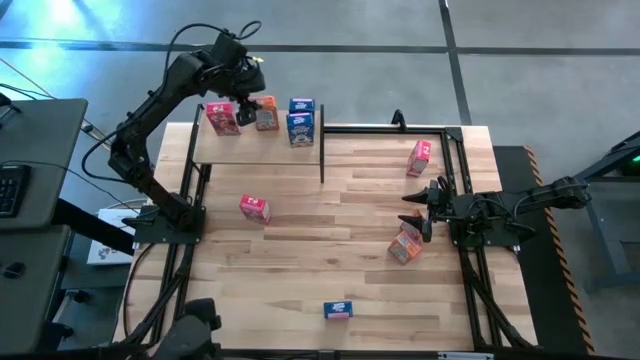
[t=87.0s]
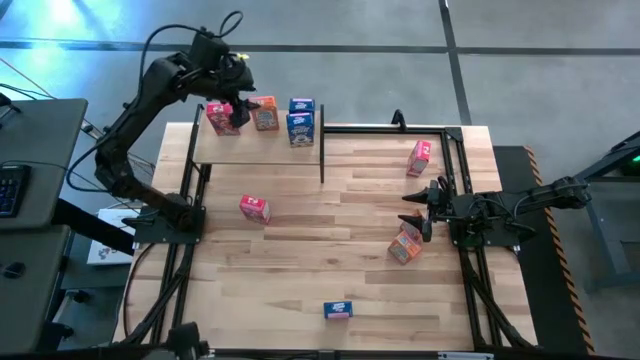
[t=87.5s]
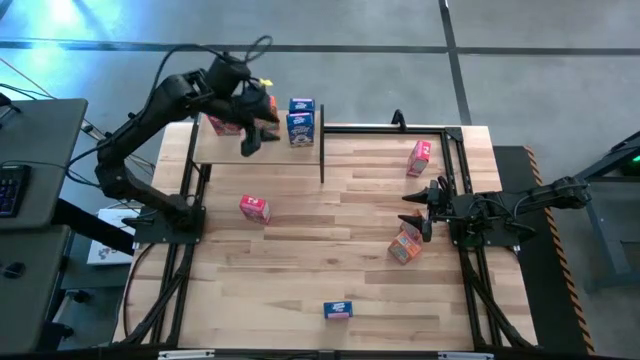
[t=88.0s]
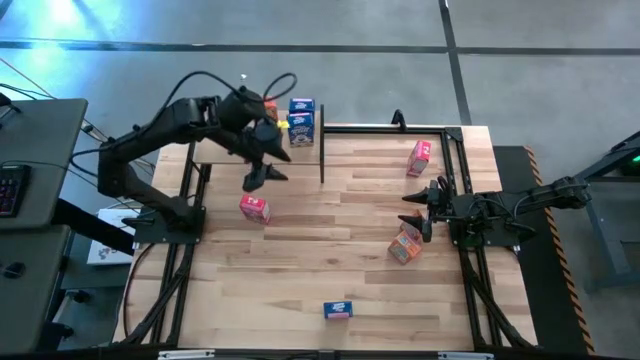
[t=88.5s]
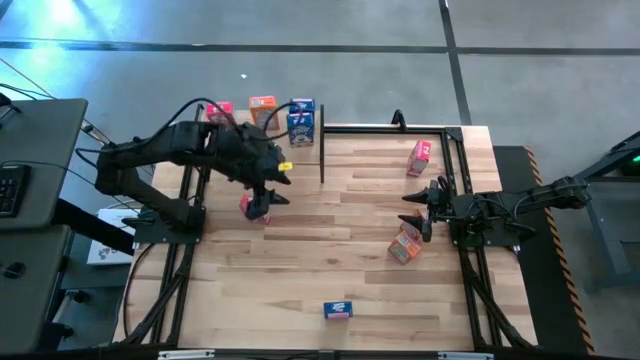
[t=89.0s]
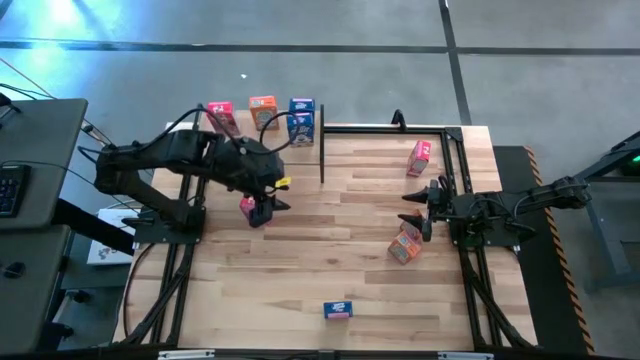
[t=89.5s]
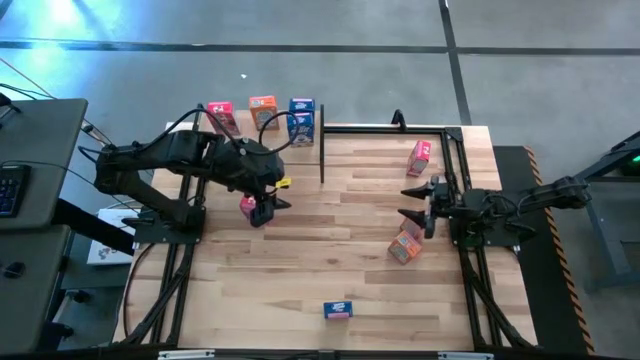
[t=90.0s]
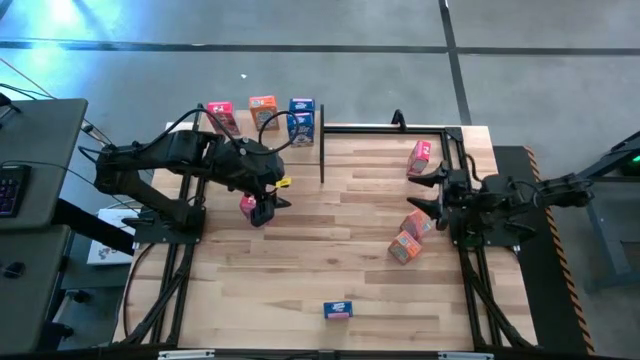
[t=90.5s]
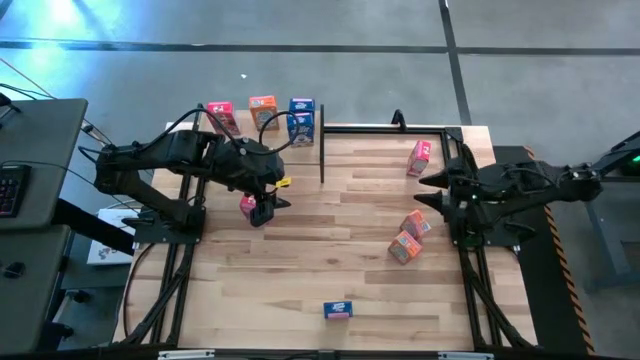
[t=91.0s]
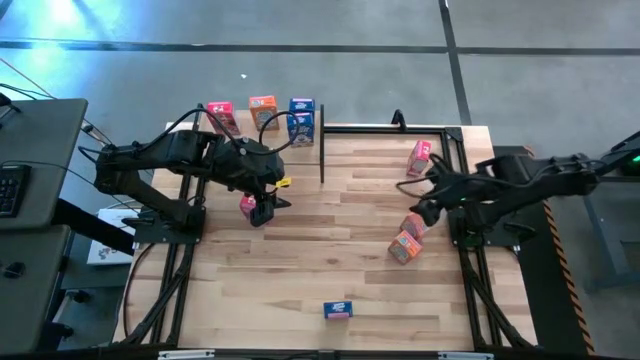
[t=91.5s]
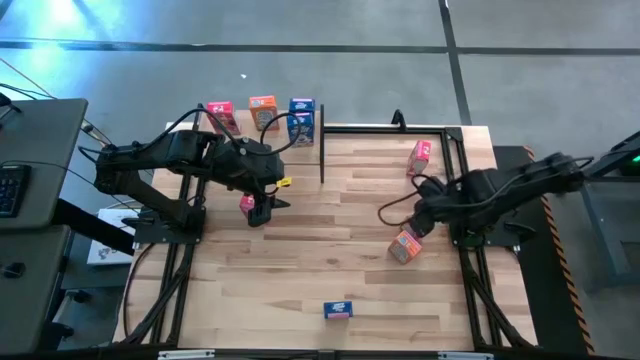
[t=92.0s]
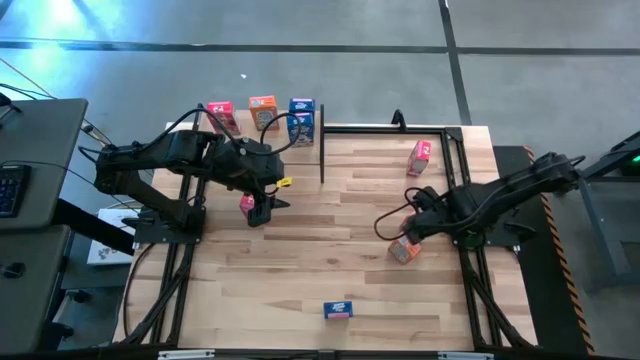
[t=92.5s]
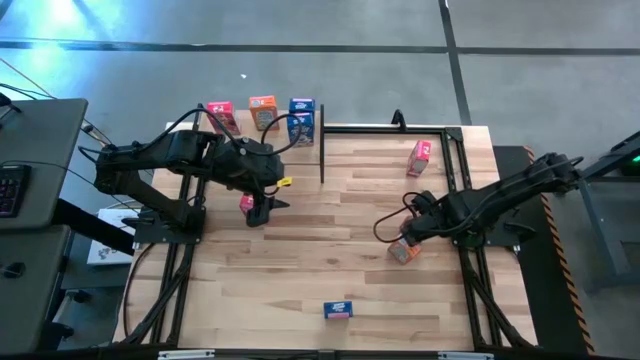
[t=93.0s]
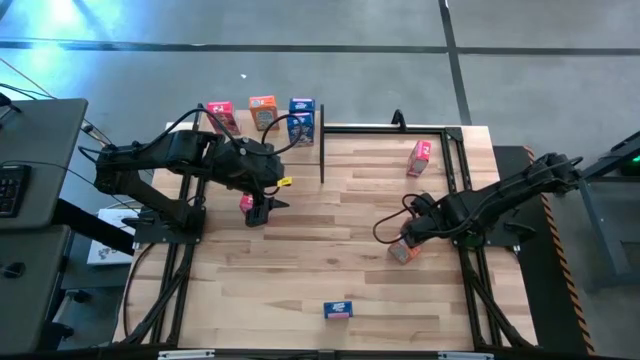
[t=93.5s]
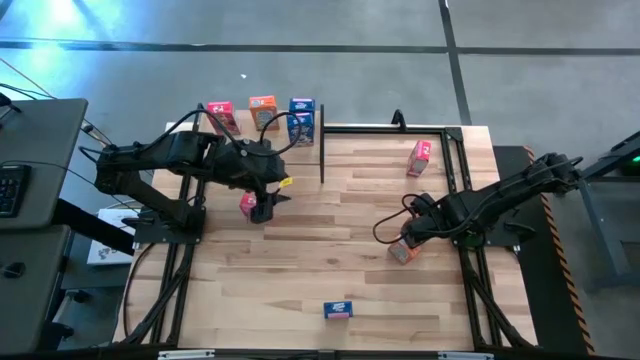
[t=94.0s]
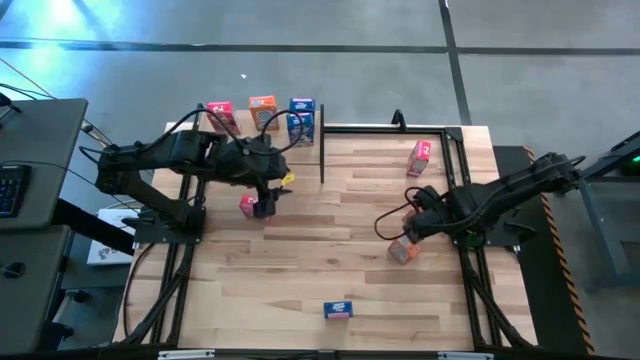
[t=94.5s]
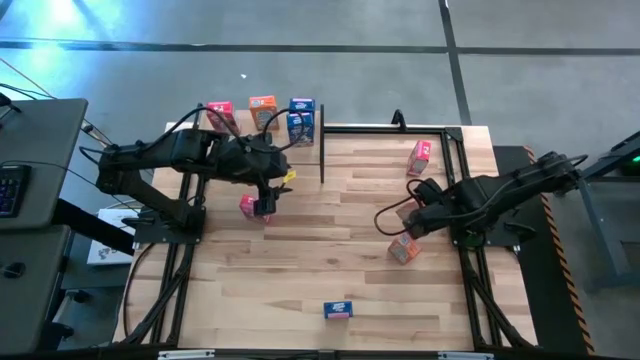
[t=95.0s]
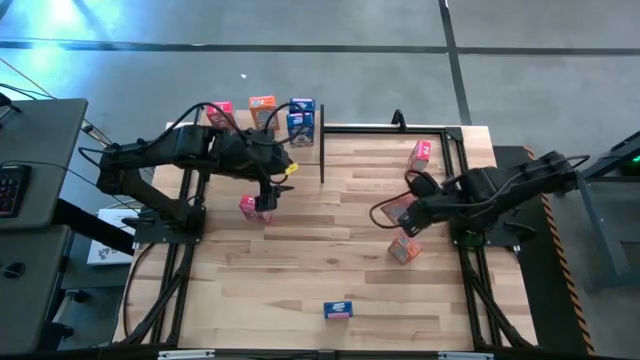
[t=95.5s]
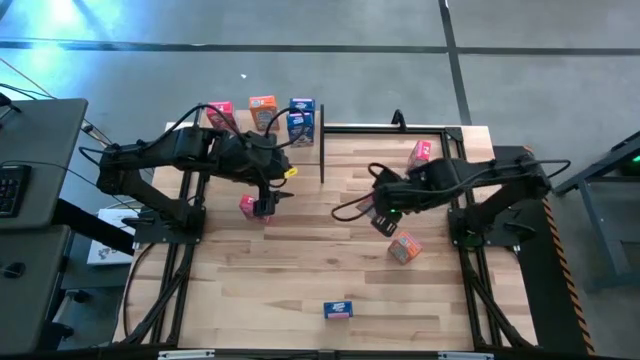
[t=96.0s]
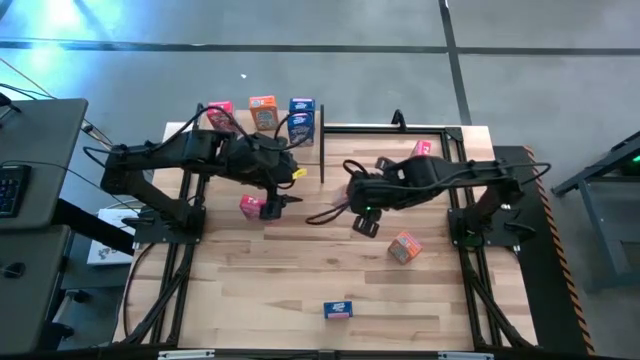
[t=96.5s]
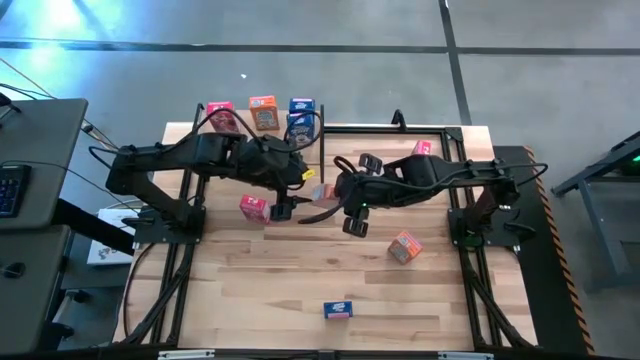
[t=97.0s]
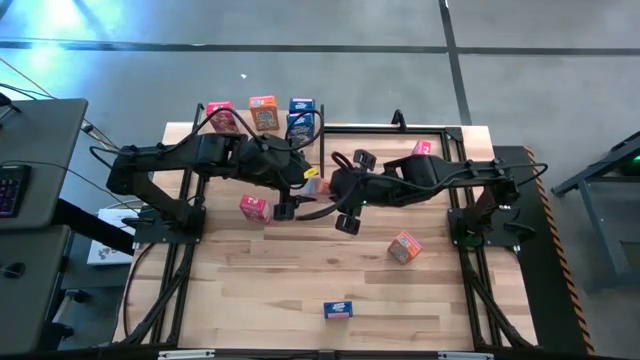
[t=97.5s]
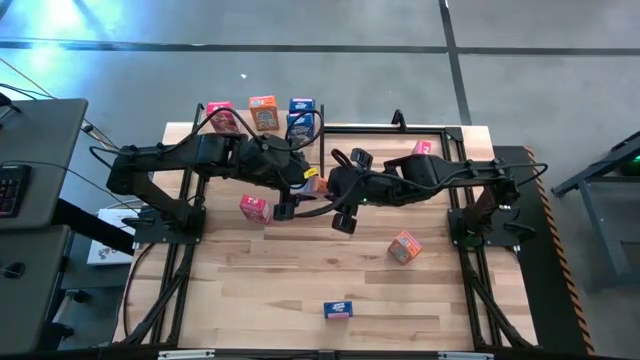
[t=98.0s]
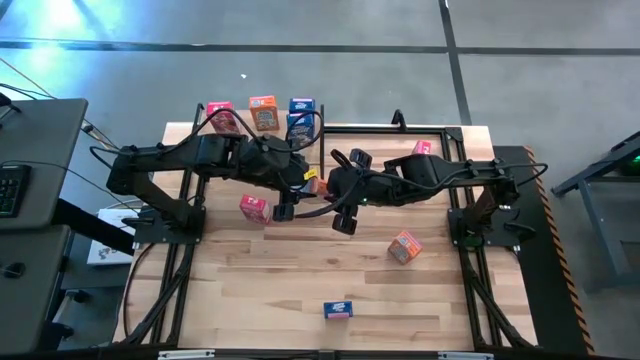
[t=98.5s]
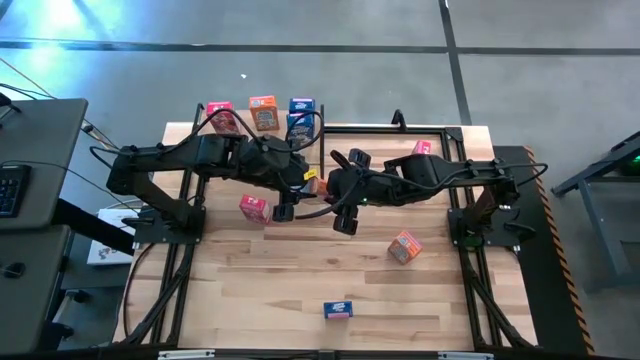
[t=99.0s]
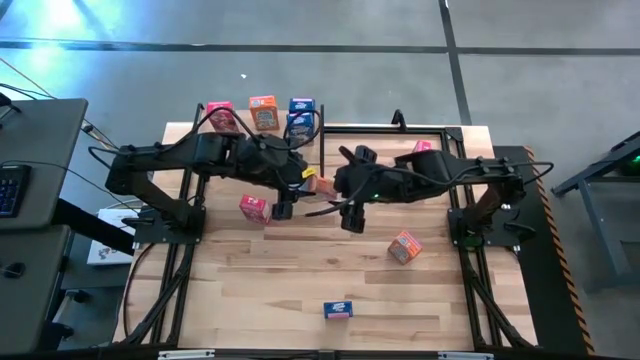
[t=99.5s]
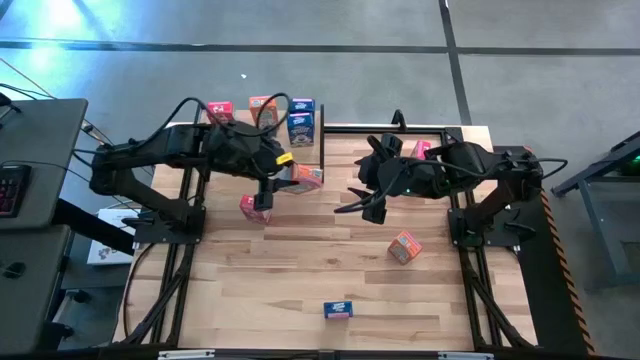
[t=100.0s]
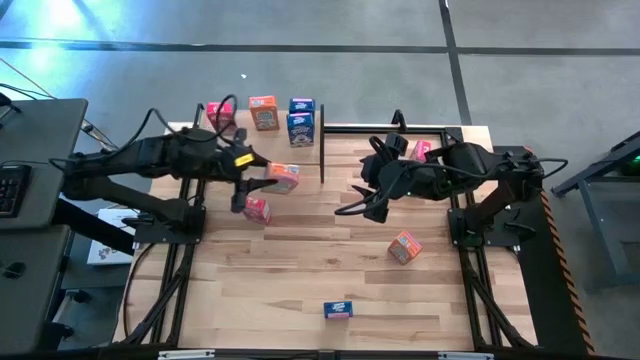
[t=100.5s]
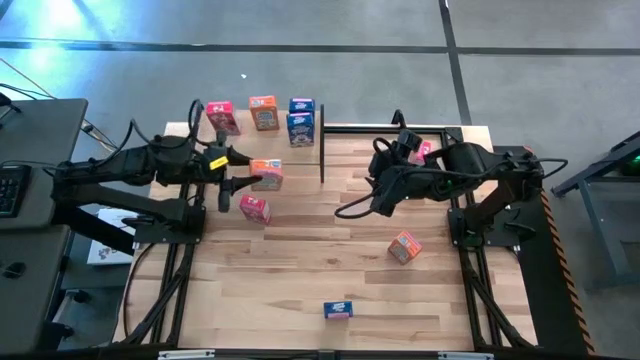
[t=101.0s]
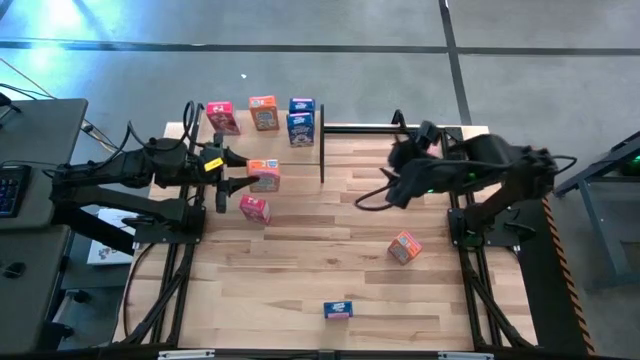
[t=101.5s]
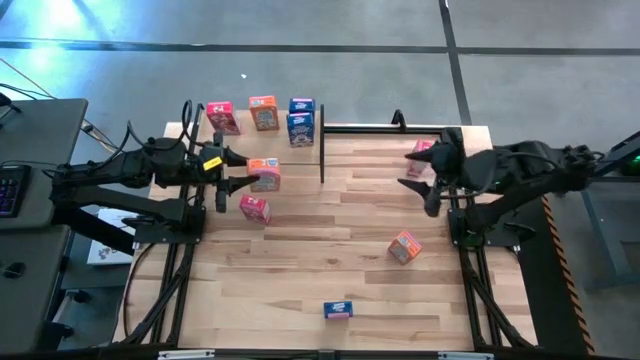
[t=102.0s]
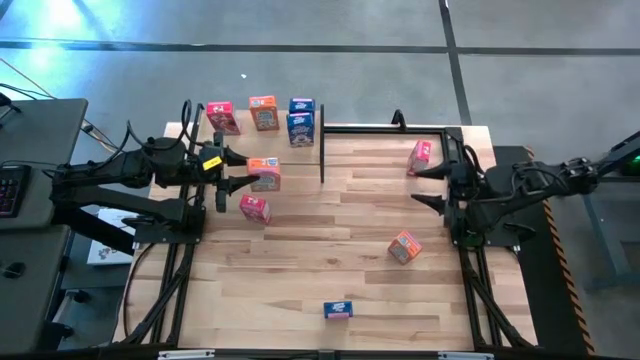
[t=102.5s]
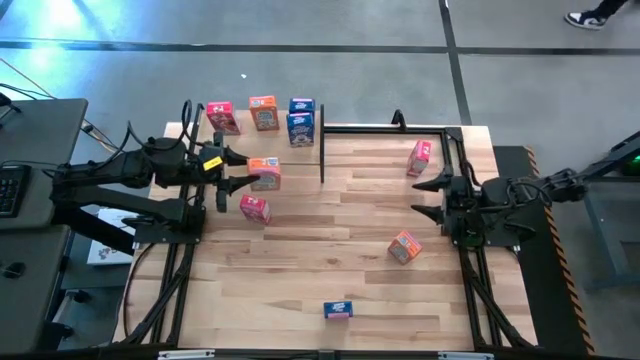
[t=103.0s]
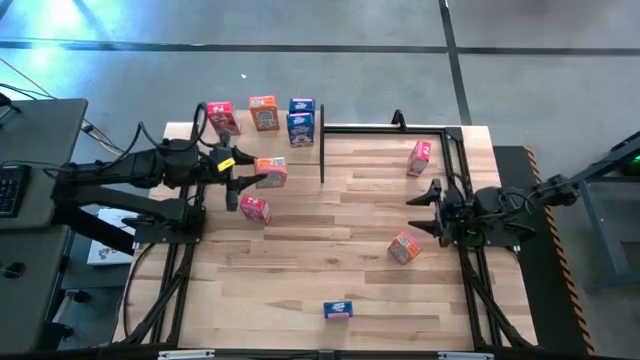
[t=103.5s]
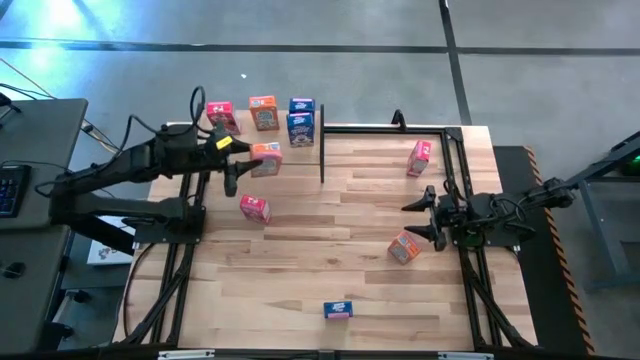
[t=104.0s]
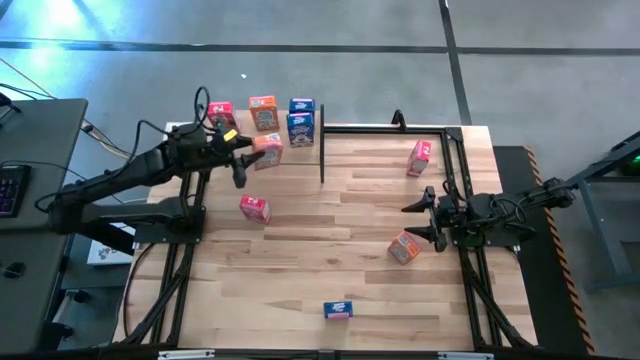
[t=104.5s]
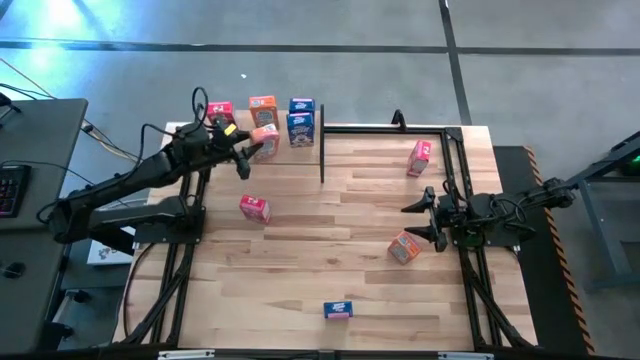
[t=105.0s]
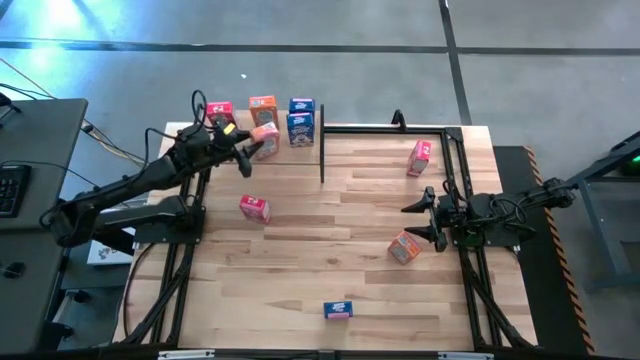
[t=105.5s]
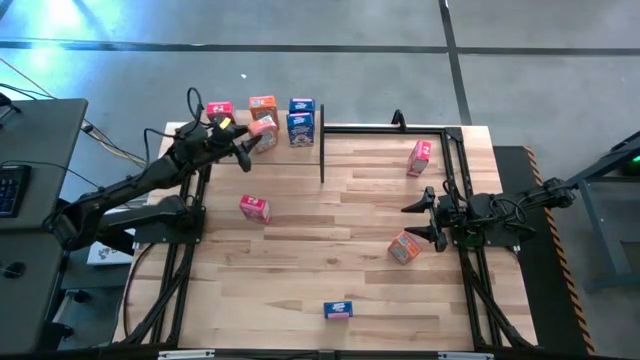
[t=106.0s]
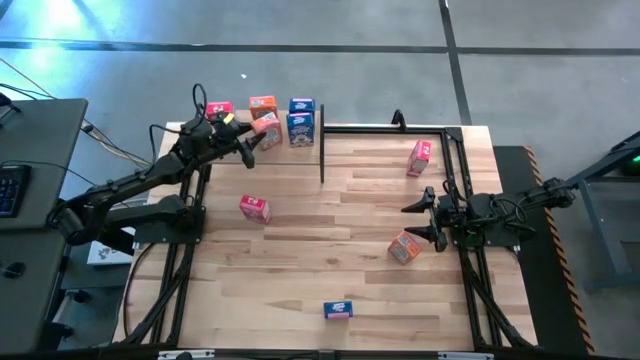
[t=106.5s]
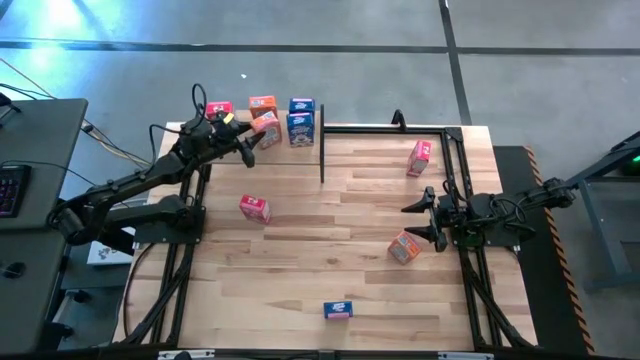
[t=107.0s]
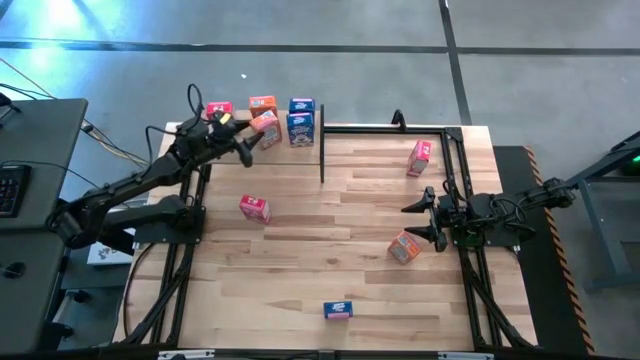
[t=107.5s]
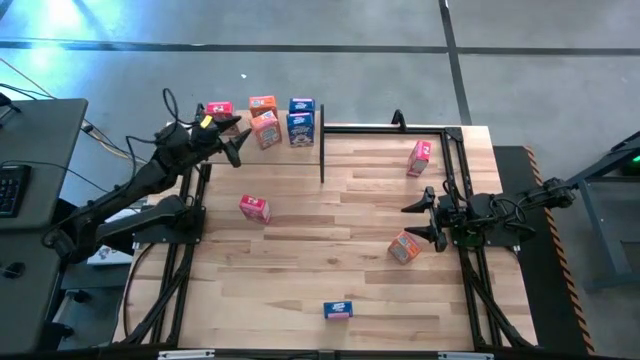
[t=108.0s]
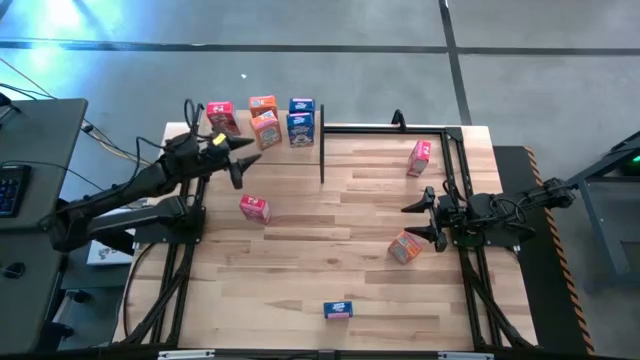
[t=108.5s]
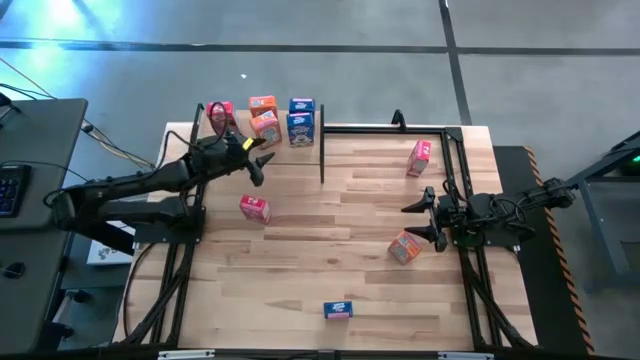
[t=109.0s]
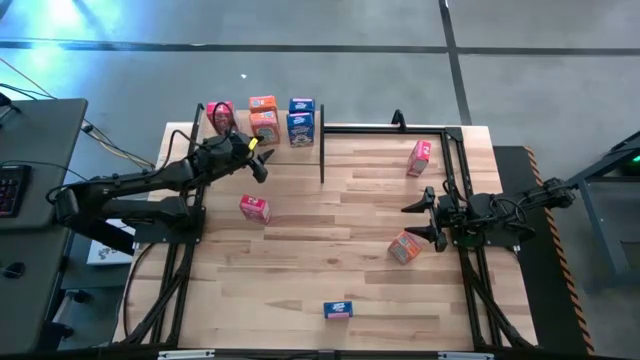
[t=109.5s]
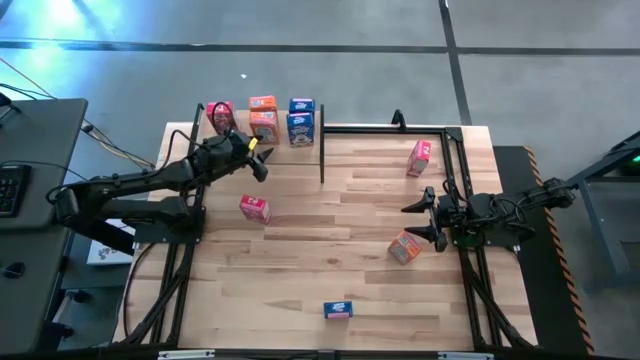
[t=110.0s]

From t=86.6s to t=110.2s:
Task: Stack cereal on shelf
Put the top orange cereal box on the the shelf aligned with the other orange cereal box
